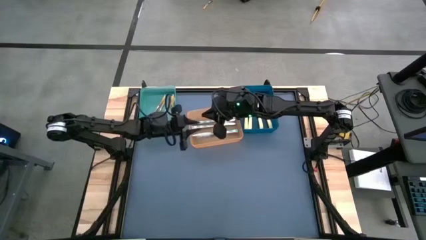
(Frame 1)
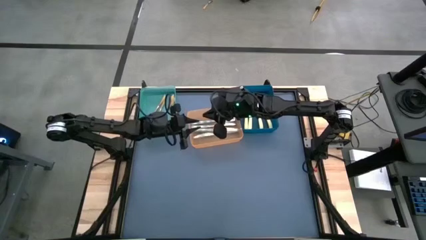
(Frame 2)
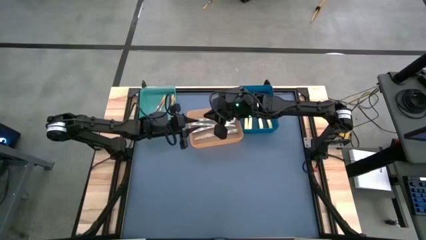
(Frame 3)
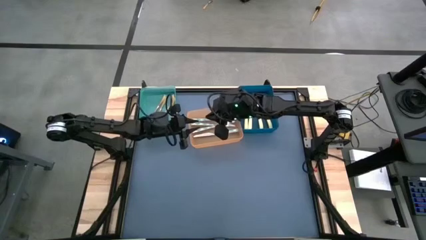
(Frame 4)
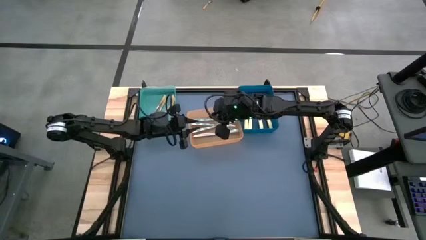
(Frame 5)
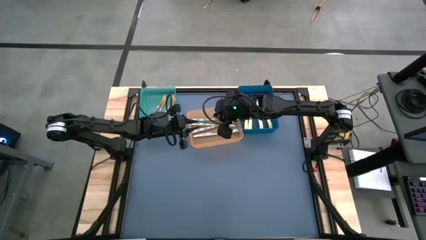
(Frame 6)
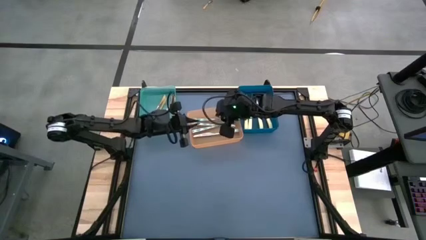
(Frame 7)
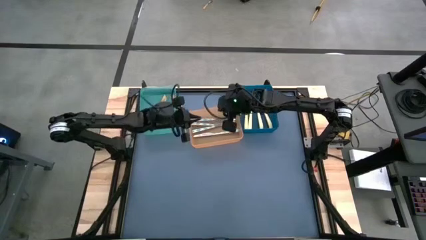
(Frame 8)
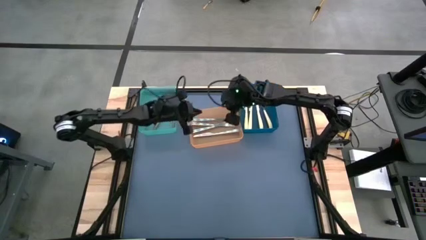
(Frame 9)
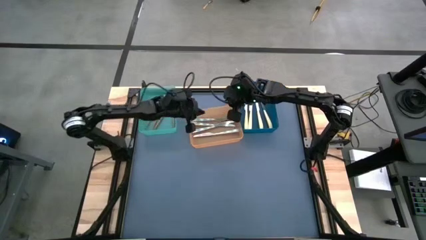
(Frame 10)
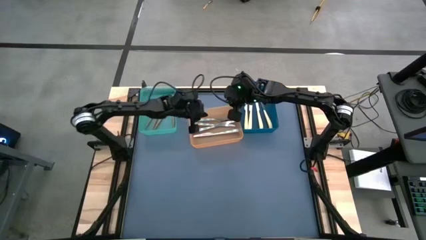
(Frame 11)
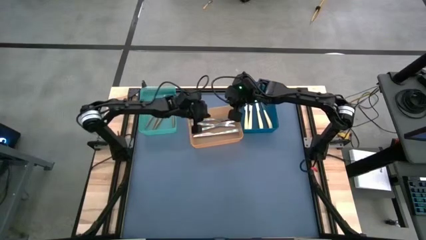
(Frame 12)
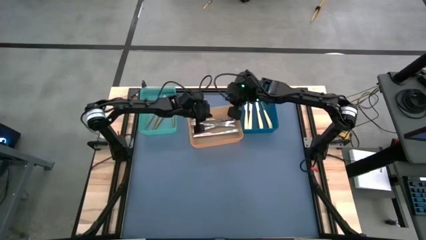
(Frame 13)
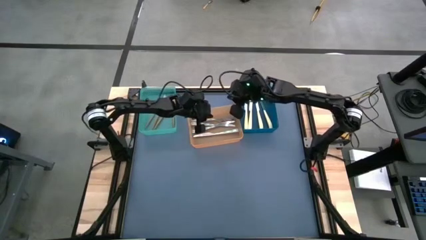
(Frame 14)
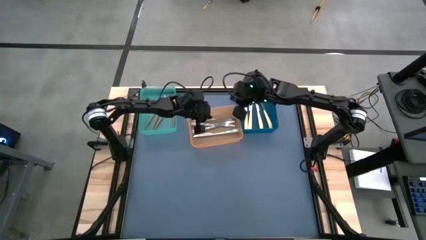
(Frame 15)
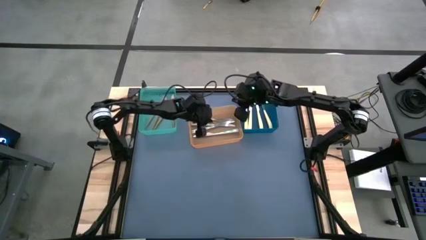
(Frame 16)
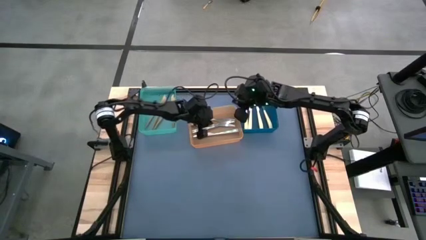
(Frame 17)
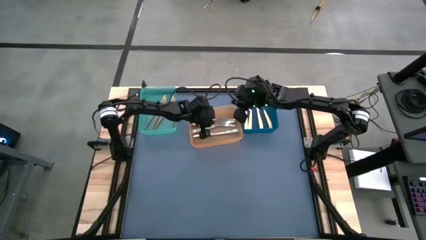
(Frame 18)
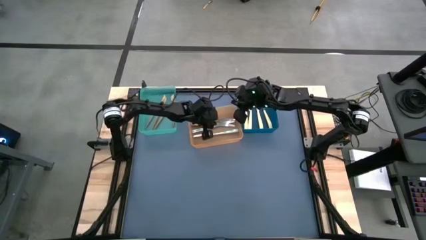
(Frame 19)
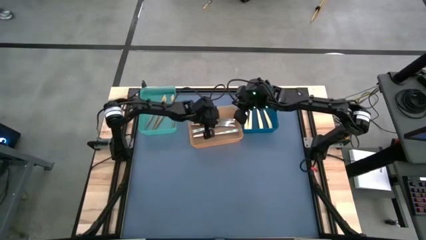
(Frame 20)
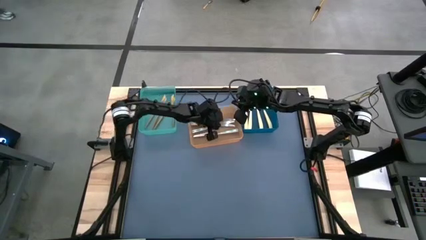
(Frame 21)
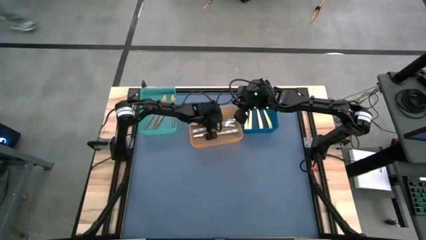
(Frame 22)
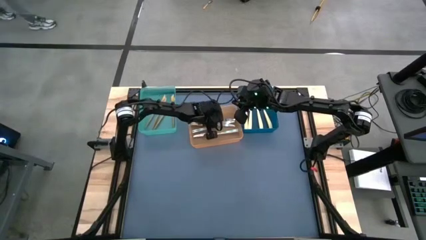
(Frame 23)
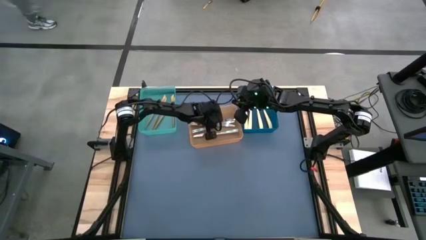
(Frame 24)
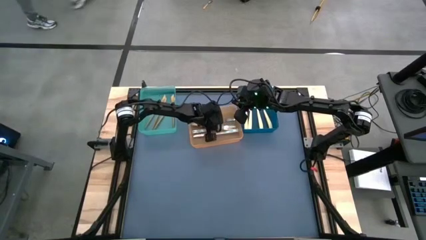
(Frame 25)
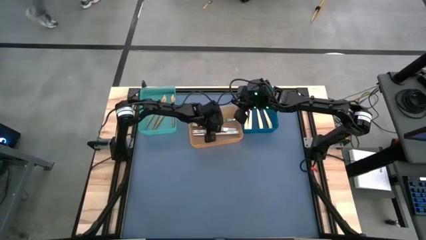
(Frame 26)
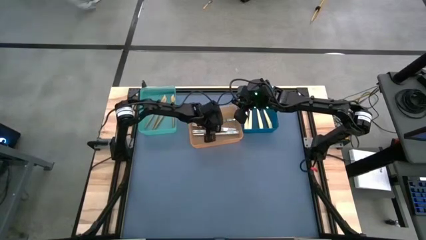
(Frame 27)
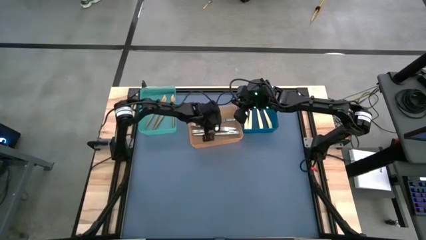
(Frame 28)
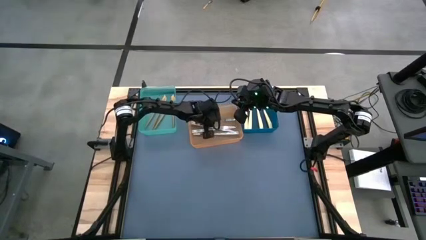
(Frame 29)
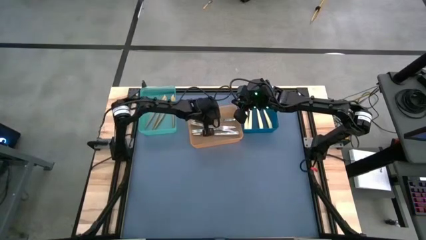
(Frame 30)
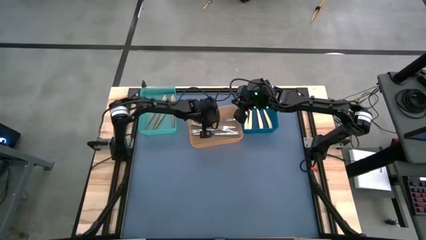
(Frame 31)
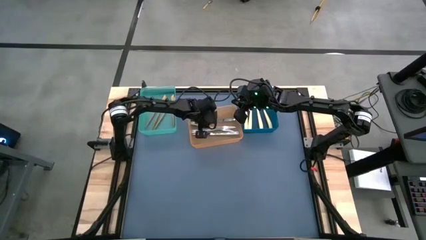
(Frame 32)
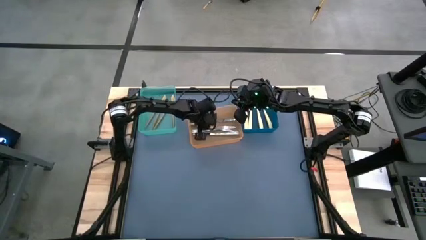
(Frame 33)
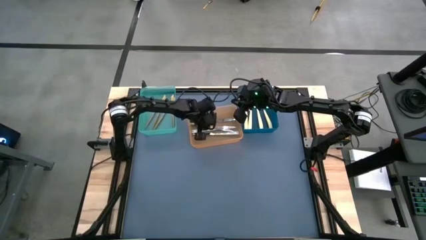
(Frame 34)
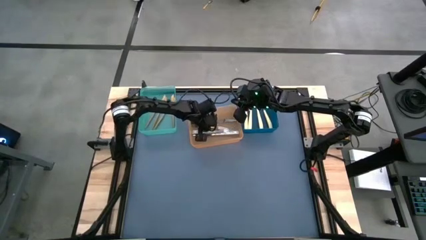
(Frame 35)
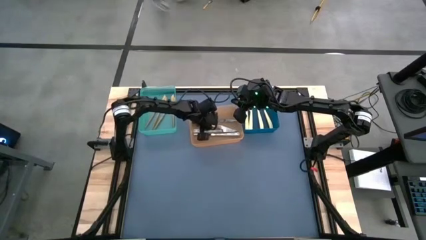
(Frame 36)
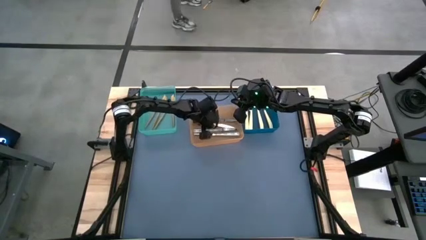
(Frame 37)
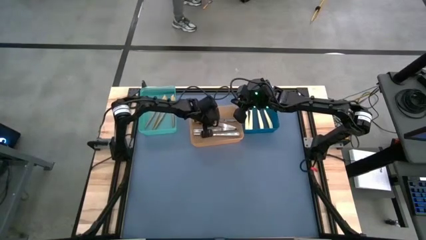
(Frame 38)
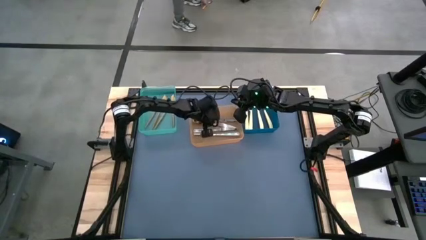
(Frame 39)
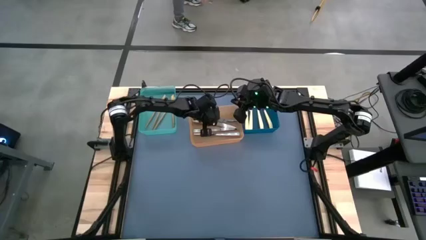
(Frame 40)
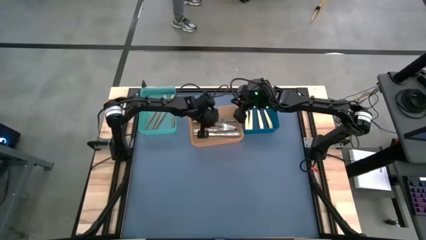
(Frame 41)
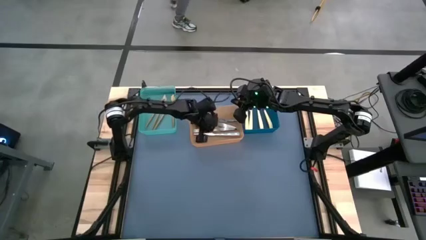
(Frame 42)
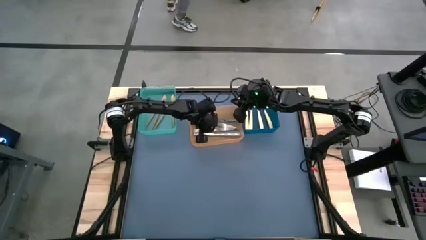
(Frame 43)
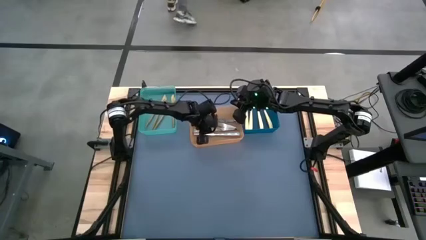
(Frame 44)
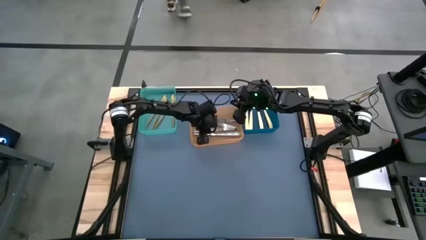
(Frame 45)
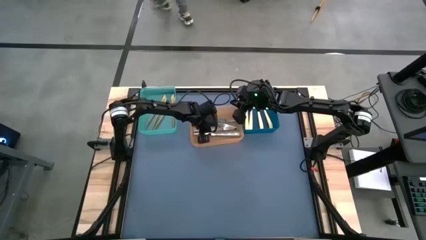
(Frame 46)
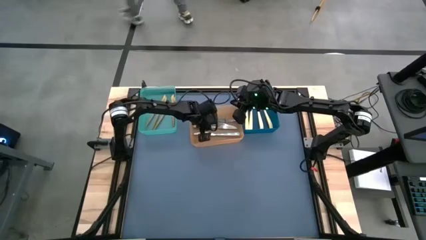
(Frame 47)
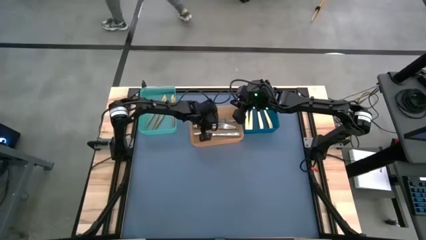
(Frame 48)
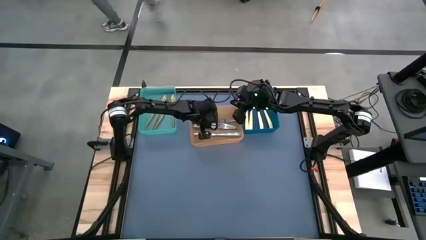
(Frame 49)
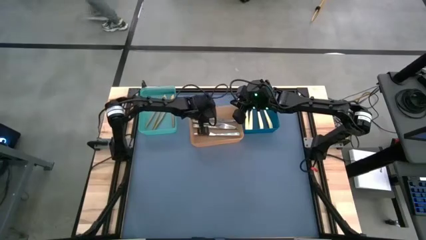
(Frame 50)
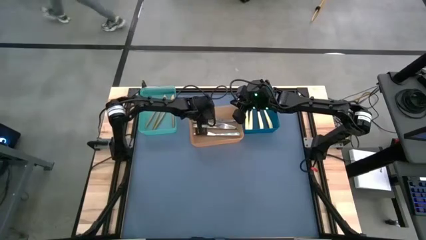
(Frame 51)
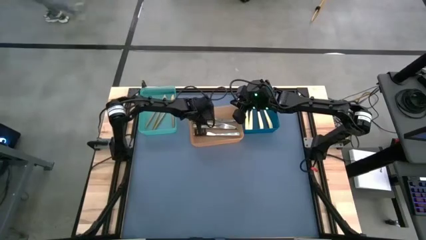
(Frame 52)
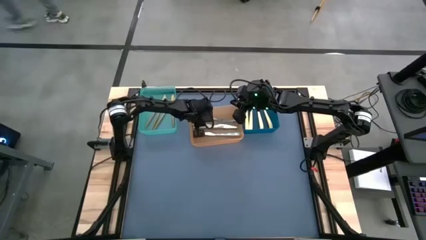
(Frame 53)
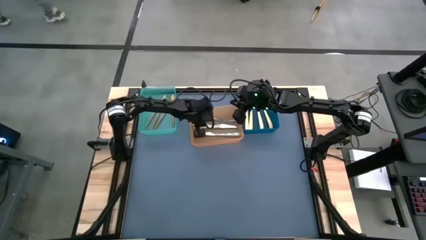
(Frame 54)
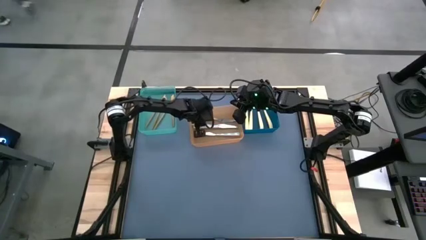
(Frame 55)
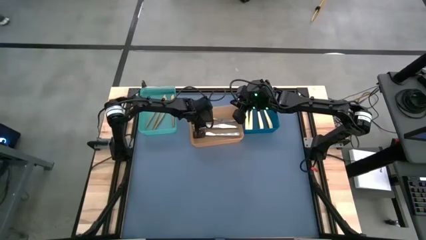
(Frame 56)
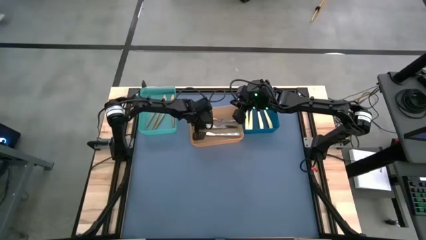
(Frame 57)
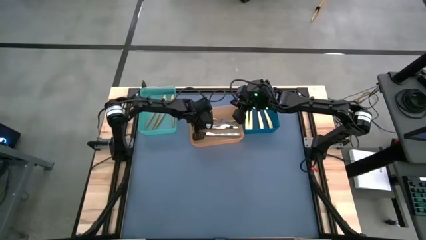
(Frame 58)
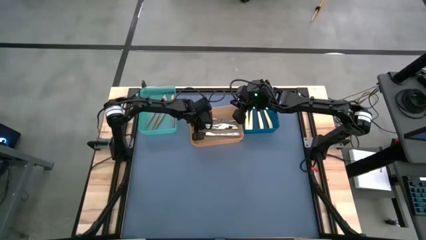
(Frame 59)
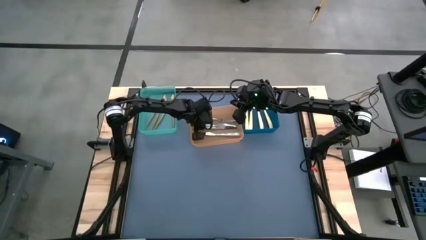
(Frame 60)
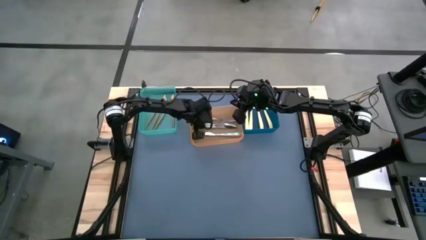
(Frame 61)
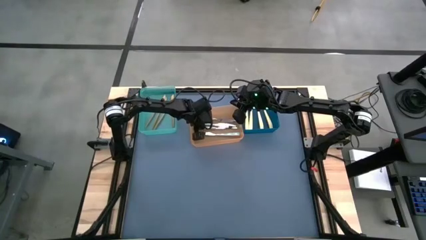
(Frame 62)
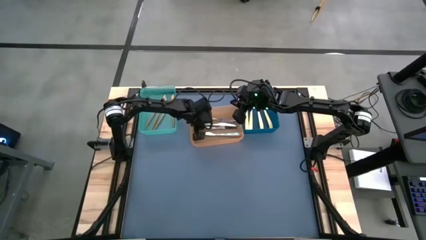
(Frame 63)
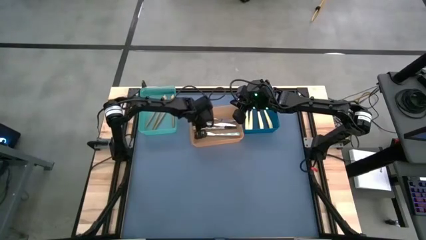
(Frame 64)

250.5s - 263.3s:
Task: Sort silverware by color (type)
Adjust the white knives in the orange bin

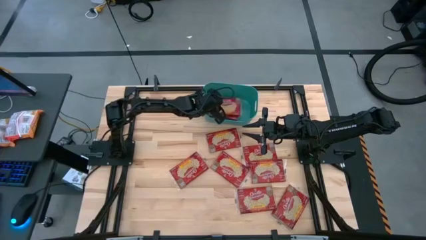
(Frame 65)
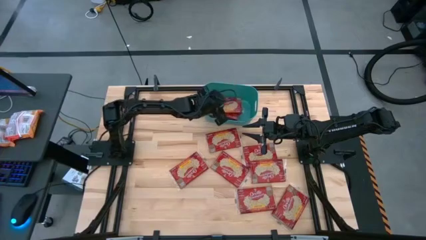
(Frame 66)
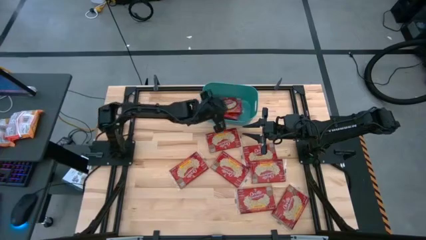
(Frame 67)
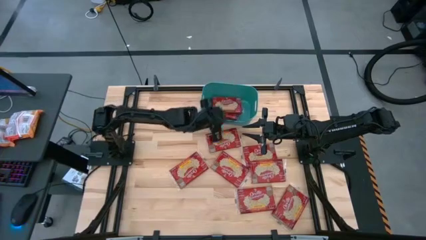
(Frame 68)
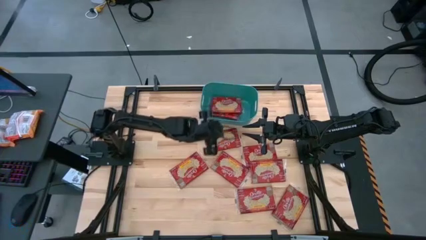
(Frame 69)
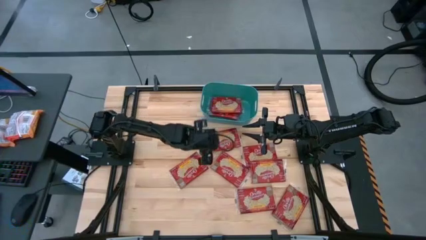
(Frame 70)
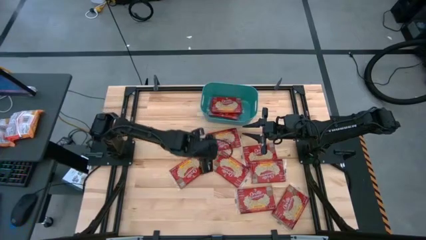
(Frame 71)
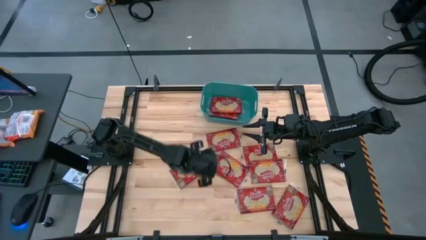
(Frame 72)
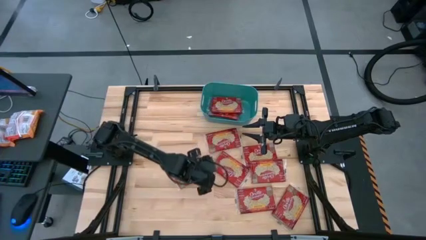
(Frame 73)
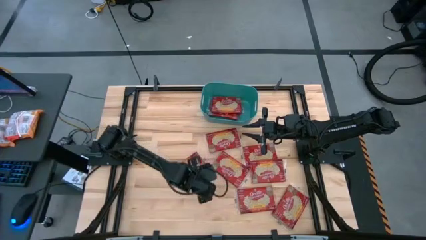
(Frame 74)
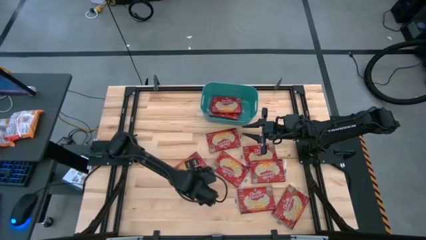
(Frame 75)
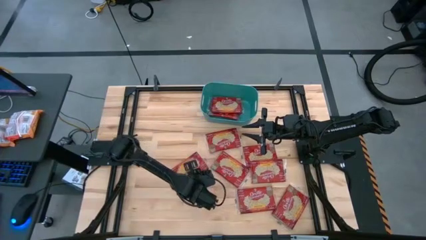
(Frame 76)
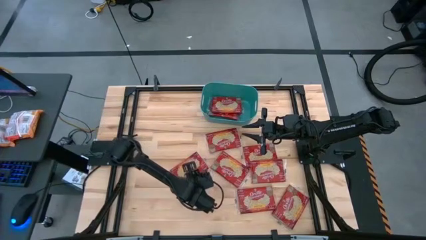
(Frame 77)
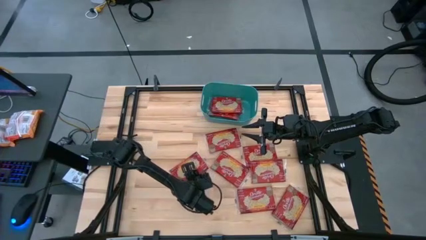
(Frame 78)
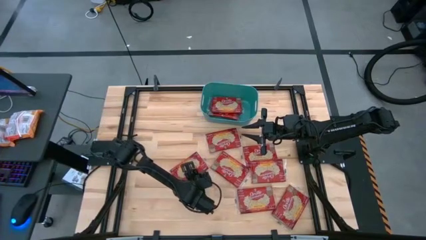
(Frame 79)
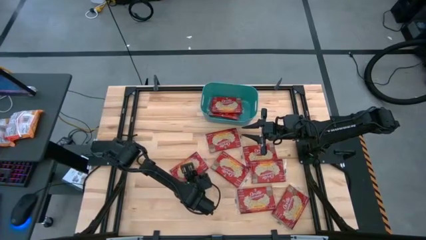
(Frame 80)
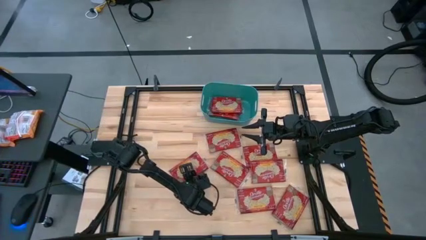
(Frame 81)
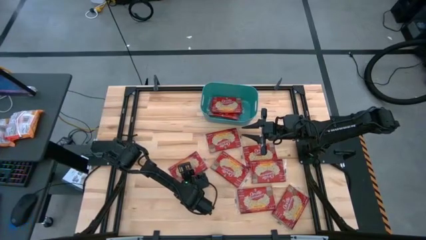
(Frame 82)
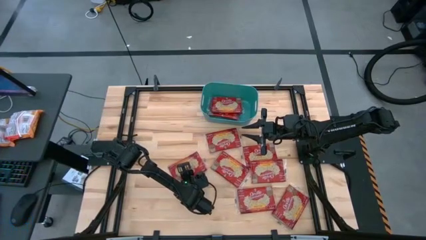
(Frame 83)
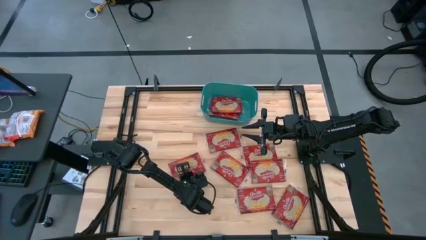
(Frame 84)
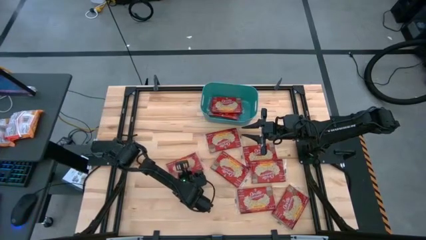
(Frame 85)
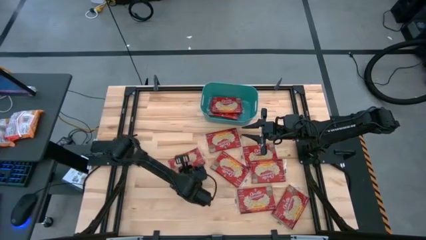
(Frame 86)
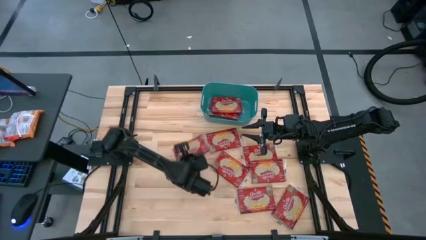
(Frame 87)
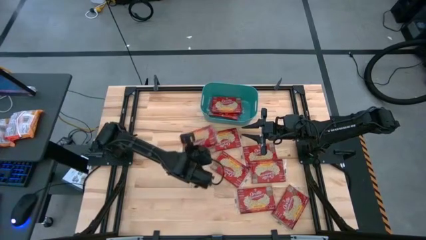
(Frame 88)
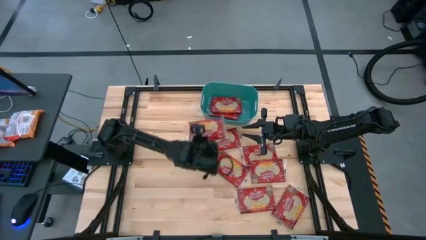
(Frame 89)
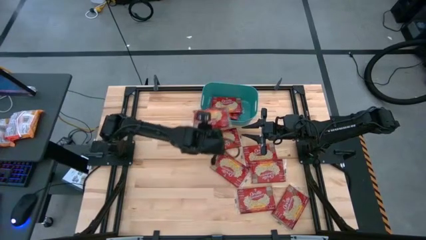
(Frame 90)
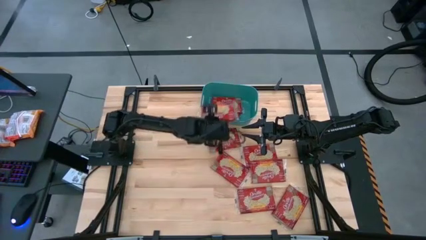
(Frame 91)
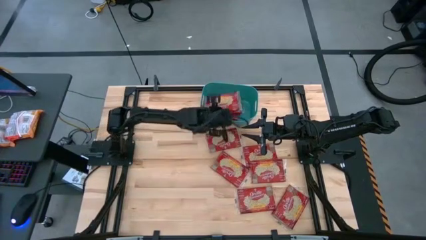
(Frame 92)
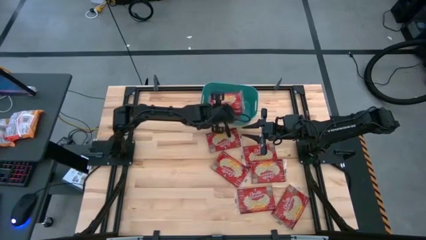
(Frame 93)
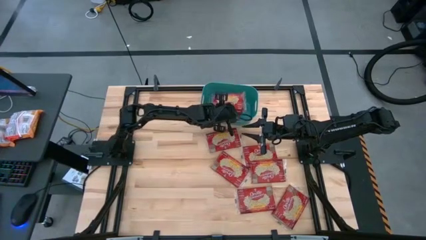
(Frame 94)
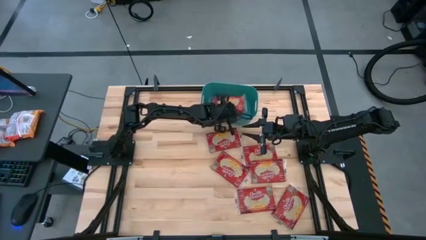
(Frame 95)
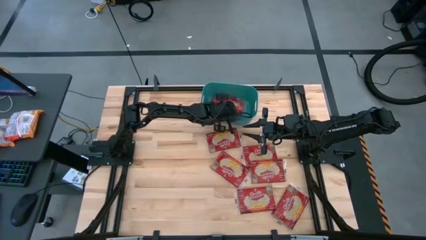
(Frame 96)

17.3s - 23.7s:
Task: Sort popcorn bags into baskets
Put the red popcorn bag into the blue bin
